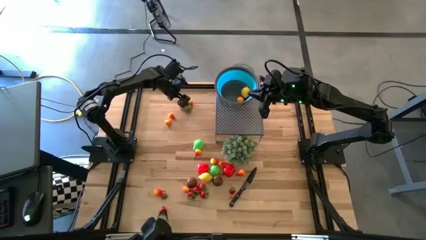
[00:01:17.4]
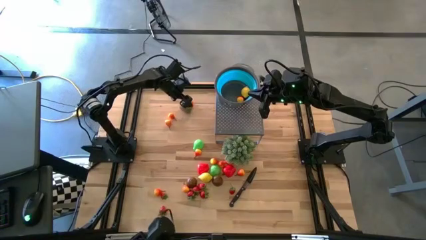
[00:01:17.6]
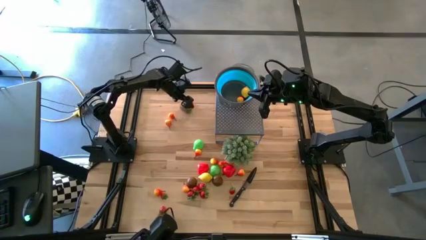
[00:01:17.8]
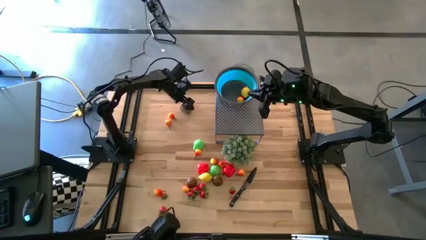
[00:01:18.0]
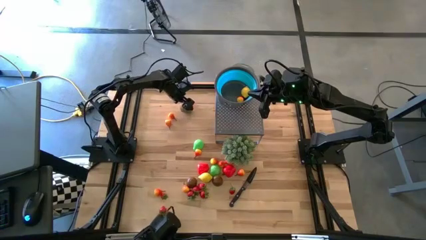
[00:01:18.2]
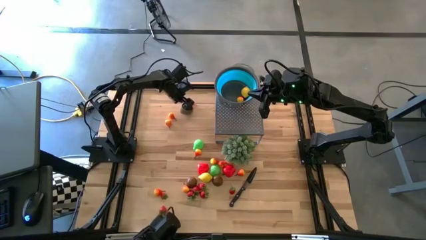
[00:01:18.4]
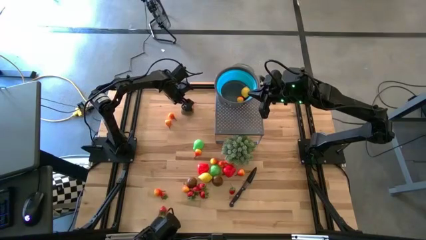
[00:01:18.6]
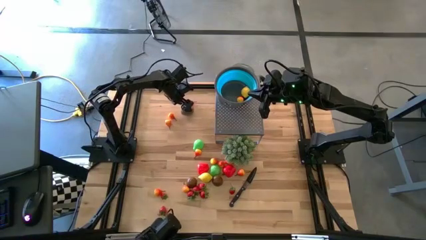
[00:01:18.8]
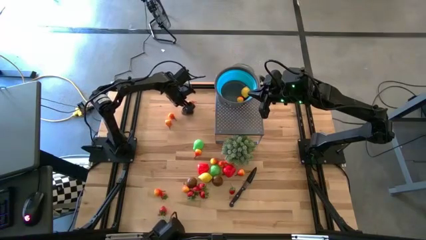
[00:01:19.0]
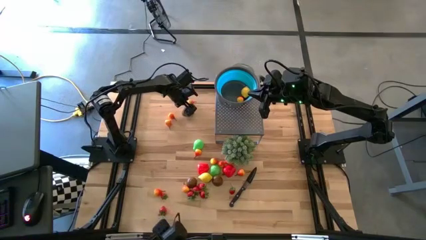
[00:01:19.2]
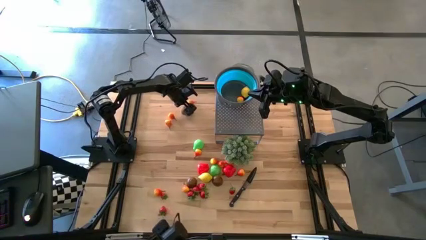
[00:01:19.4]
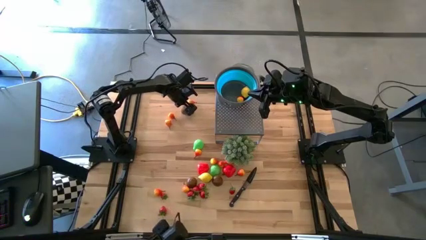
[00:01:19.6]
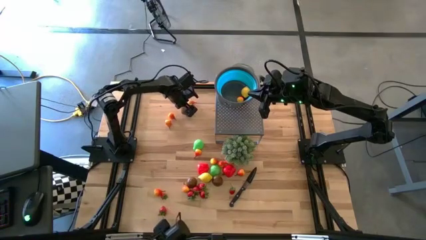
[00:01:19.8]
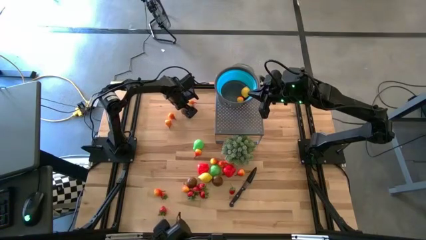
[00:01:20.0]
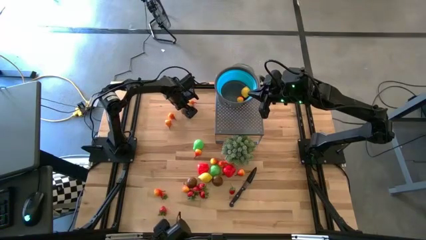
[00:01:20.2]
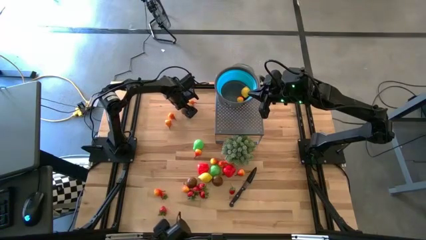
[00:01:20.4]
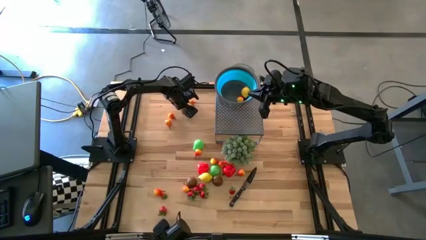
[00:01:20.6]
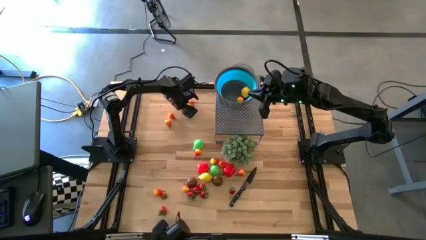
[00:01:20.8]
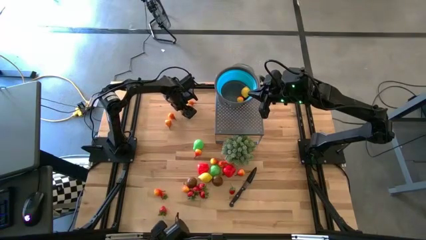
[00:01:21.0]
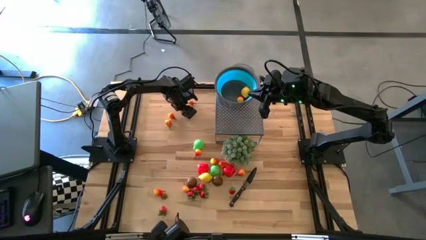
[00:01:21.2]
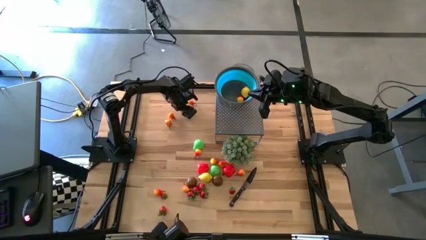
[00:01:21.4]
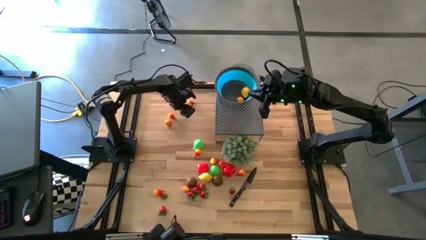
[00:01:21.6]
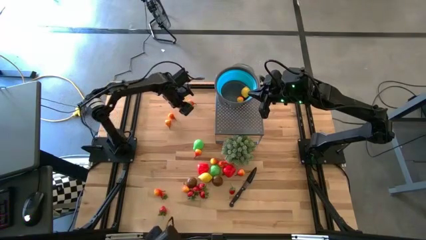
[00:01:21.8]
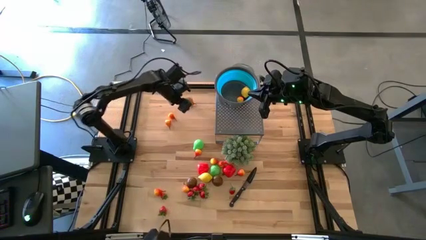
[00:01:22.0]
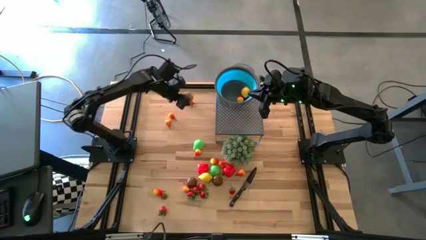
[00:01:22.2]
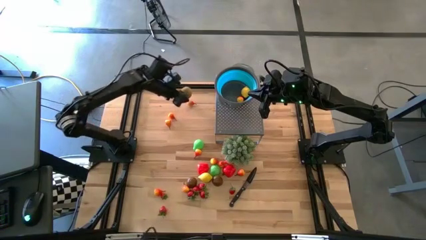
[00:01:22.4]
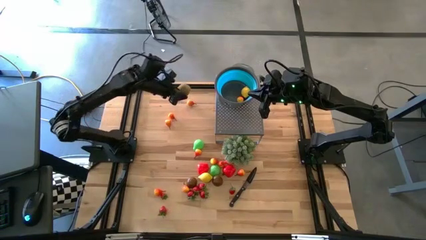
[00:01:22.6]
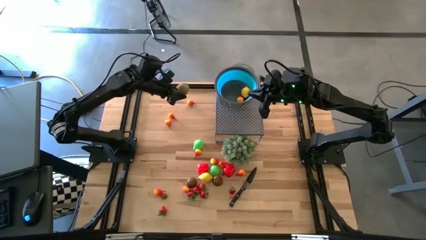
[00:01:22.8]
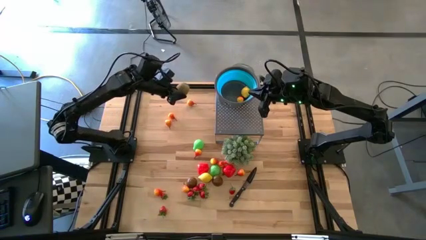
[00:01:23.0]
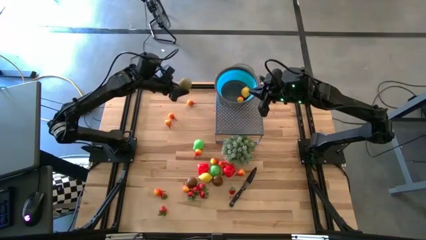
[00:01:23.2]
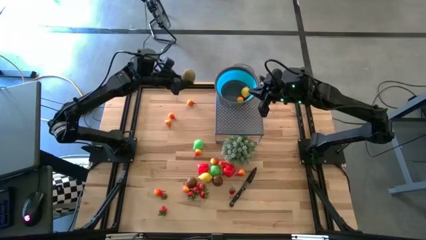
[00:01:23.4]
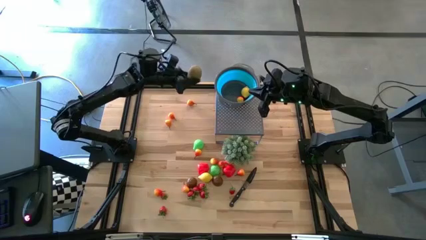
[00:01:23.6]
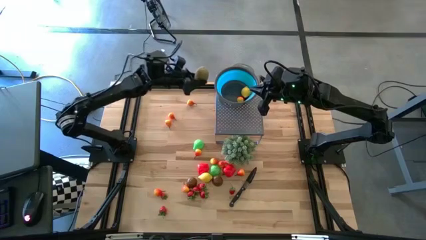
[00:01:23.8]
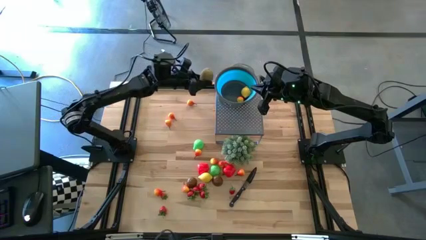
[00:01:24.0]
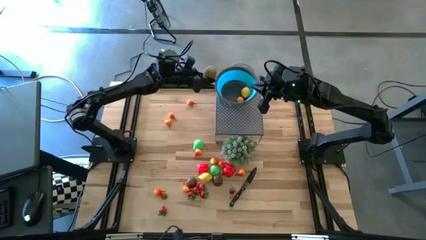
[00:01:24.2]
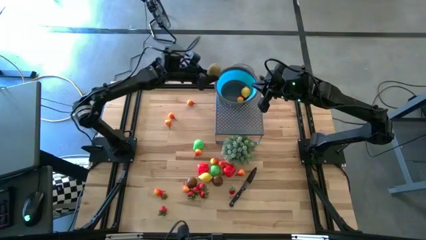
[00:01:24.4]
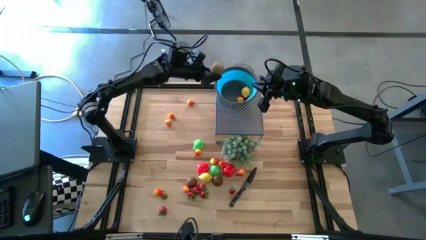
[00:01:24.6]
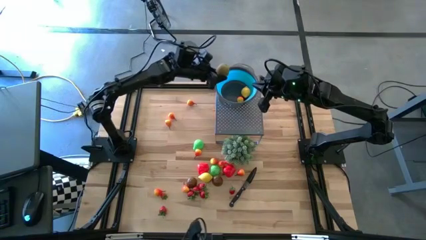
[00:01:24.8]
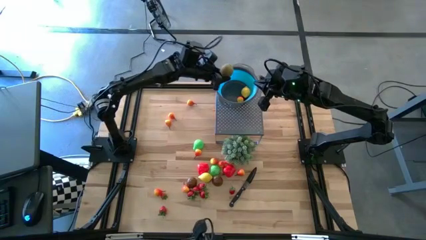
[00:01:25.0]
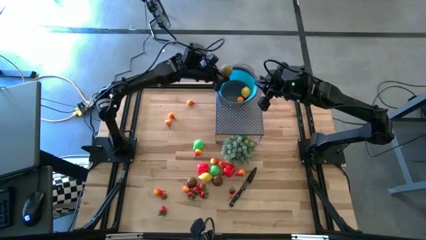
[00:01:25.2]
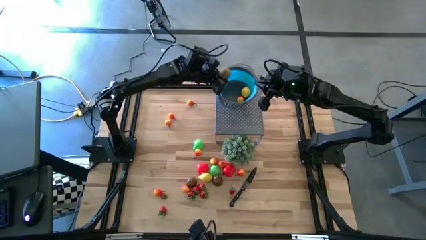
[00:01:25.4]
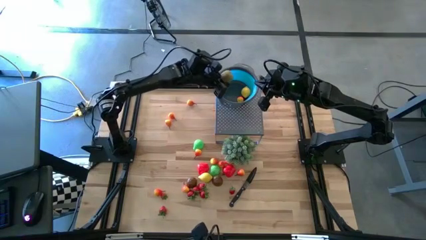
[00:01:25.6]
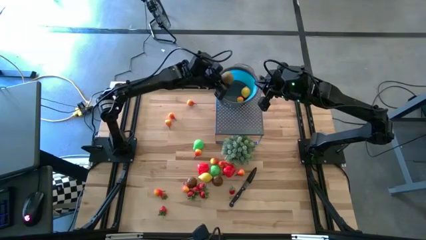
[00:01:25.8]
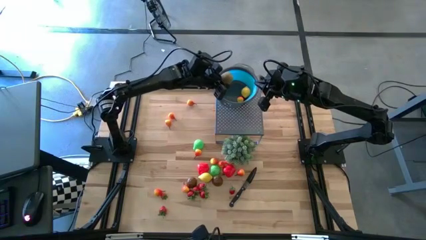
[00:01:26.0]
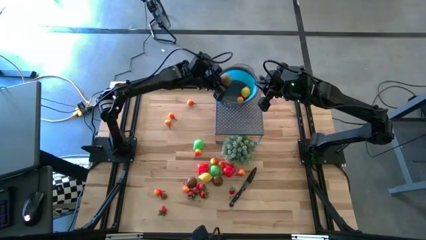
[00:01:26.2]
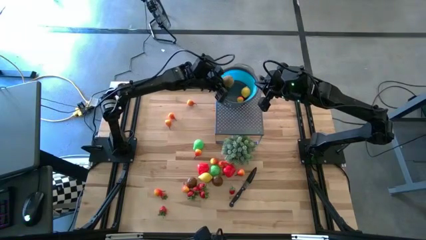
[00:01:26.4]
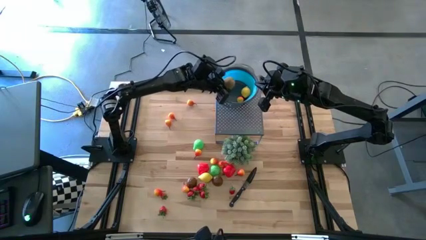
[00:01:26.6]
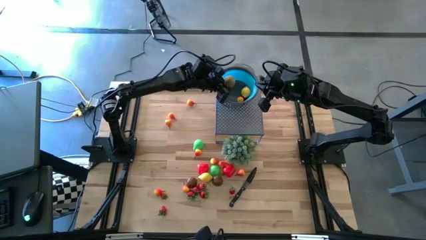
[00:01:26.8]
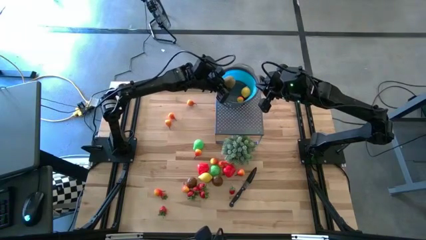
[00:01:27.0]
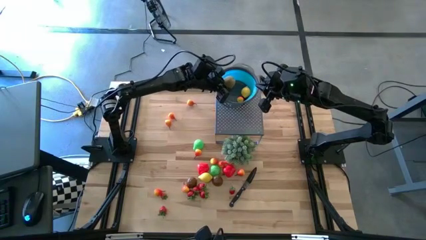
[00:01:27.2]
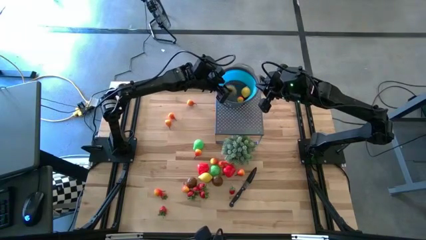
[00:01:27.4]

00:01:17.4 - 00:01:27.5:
Task: Pick & Place Fruit
Put the brown kiwi into the blue strainer bowl

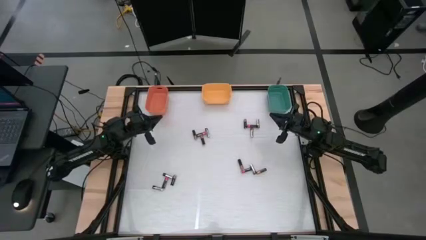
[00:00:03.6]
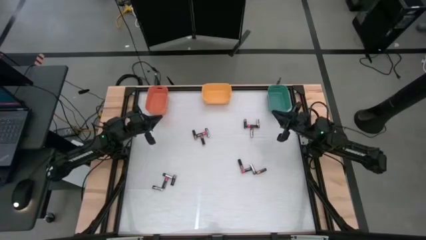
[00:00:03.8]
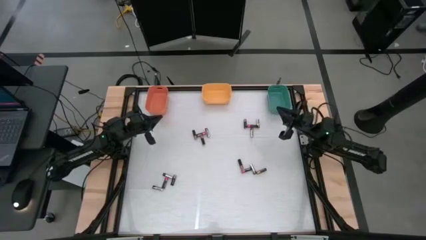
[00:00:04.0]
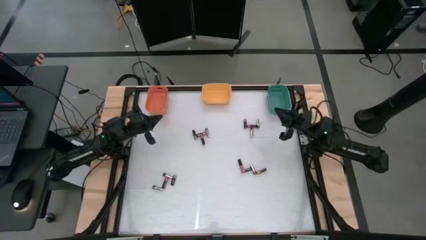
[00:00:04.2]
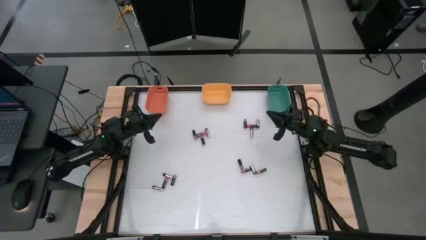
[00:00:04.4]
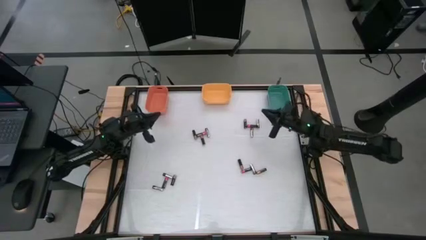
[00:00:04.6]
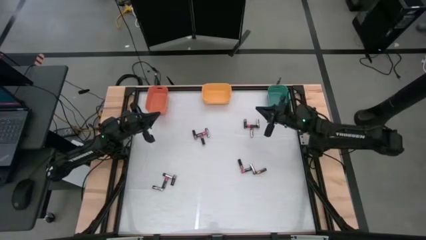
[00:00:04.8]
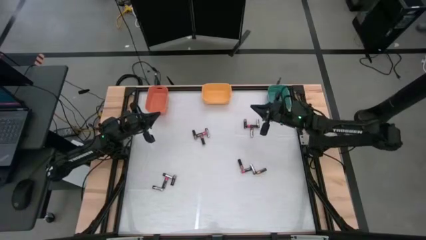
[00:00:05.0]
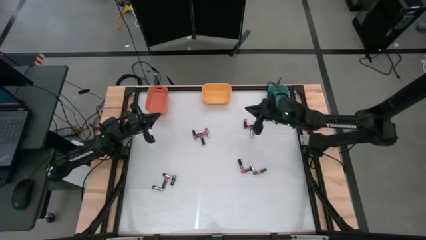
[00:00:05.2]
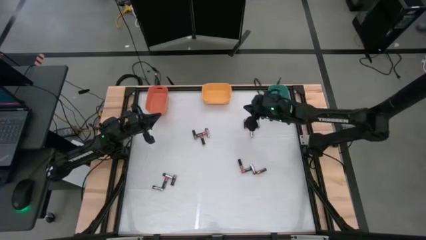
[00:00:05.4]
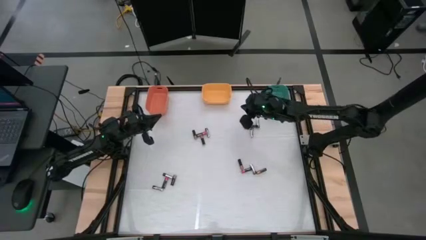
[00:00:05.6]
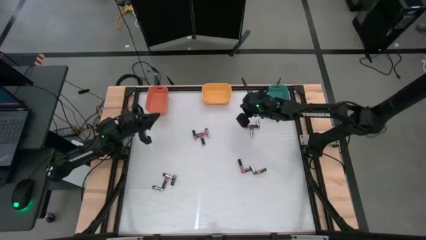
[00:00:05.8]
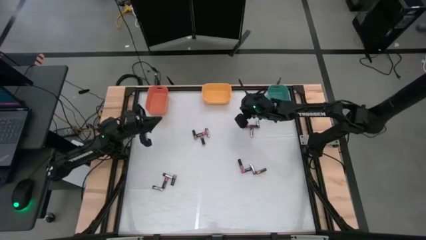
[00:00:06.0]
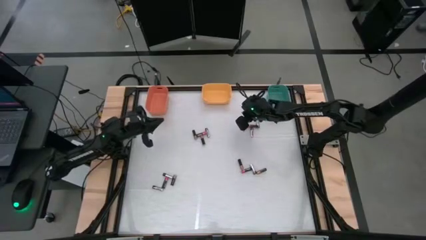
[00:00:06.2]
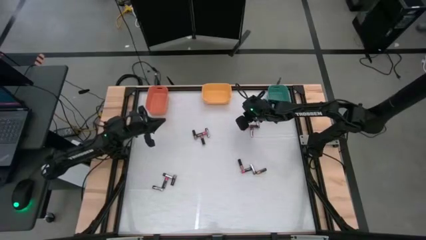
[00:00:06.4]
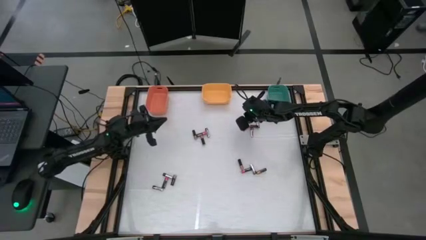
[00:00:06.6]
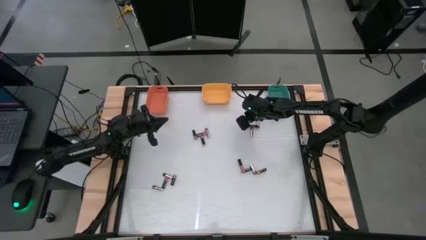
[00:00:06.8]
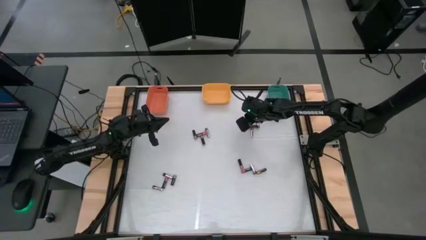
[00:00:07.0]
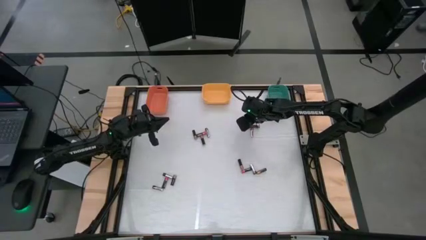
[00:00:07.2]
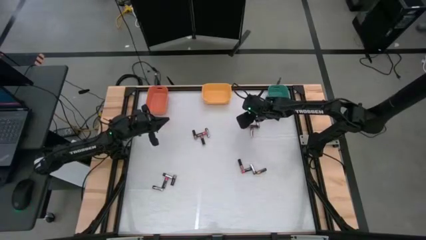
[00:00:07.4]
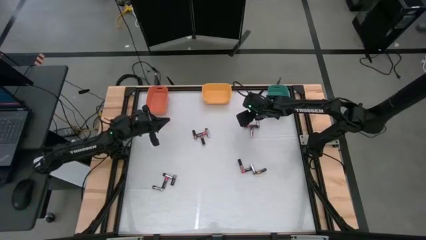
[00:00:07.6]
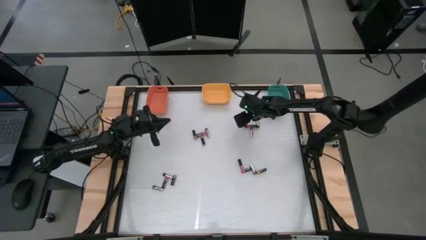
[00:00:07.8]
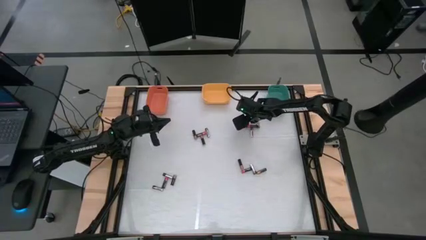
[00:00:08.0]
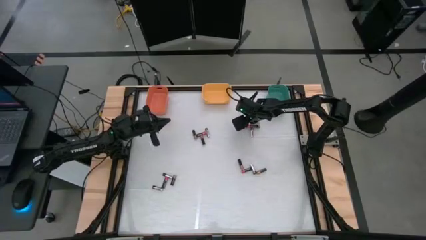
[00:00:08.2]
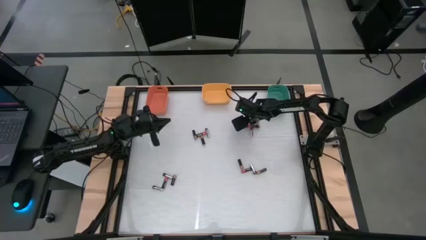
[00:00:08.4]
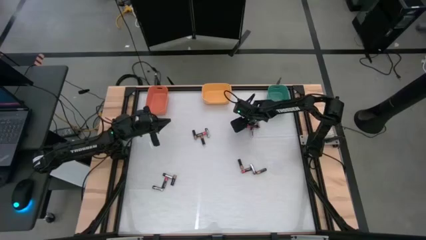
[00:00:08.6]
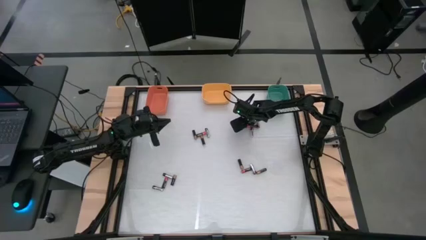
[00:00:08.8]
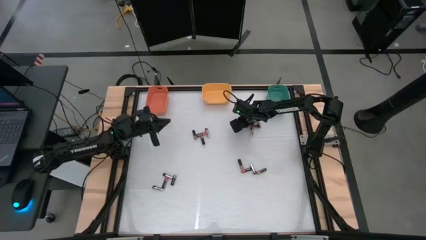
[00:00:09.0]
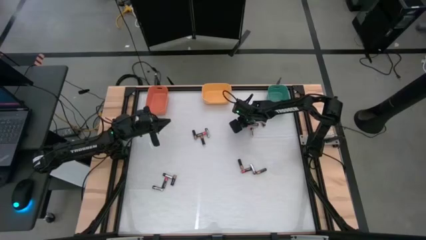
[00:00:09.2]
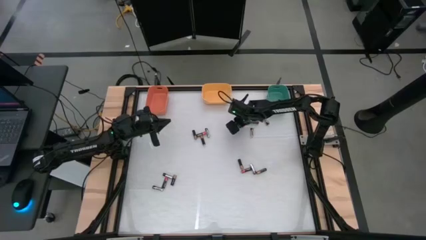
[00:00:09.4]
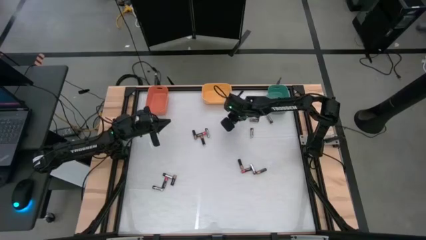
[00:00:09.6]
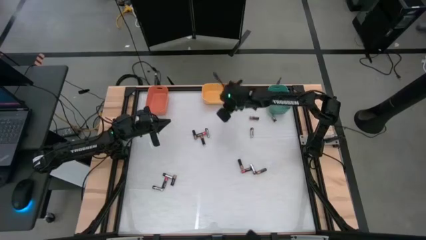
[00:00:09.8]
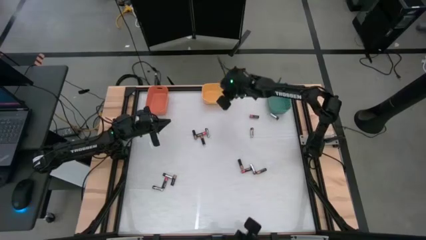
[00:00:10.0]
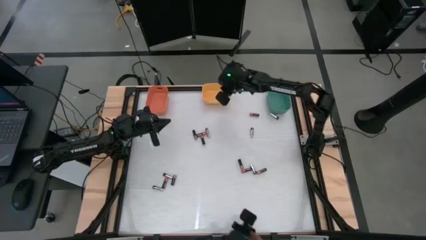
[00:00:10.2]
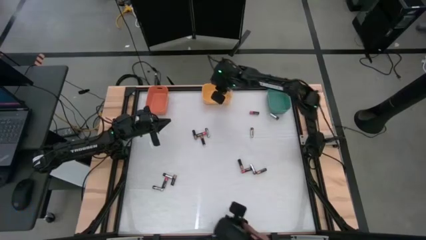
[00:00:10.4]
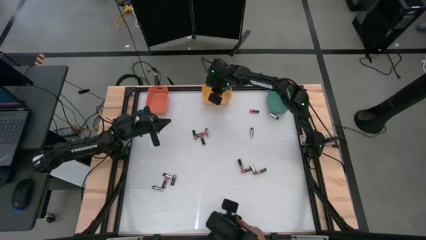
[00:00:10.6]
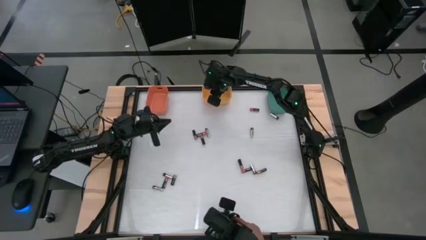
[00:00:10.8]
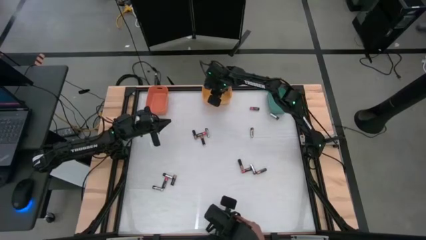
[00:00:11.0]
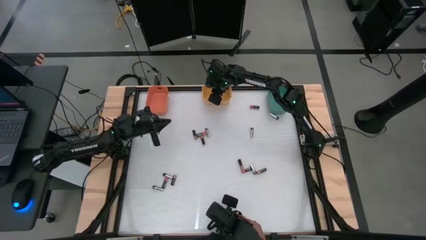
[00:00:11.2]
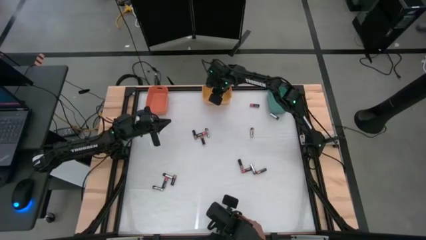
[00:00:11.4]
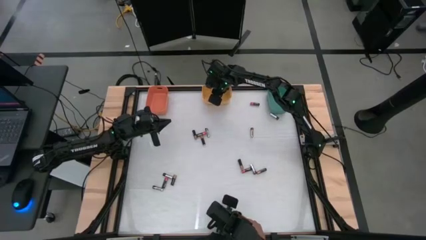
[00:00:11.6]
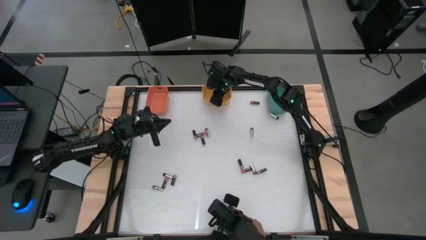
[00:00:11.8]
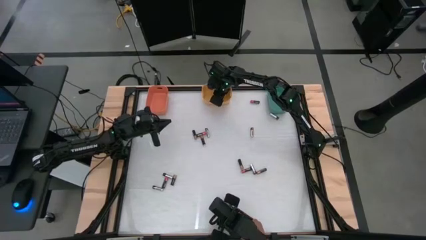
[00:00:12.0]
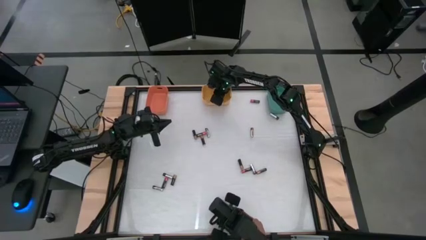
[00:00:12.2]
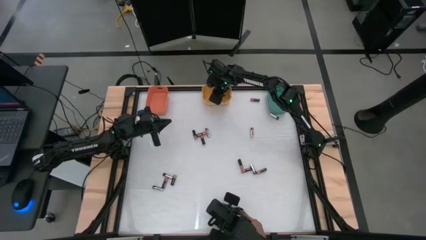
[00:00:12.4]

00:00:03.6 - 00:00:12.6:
Task: Sort batteries
Put the gold battery into the yellow bin
